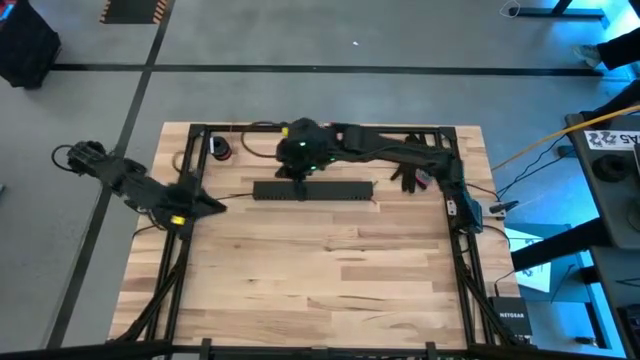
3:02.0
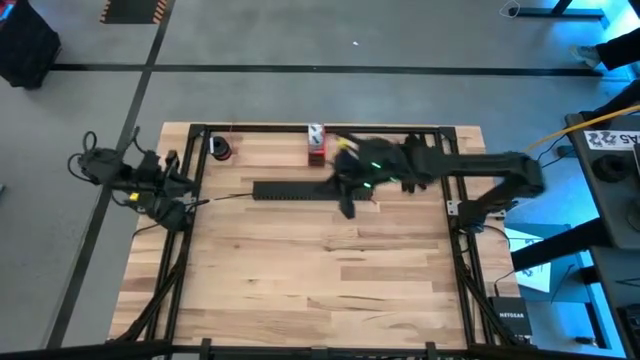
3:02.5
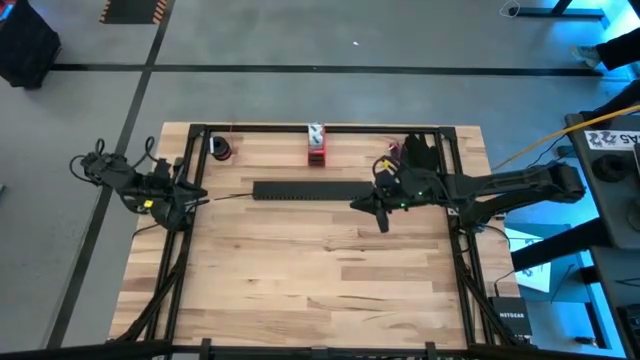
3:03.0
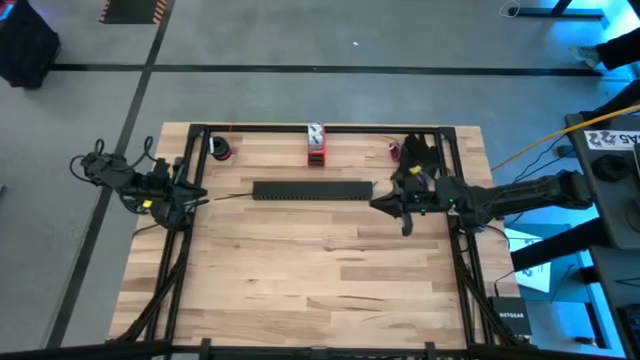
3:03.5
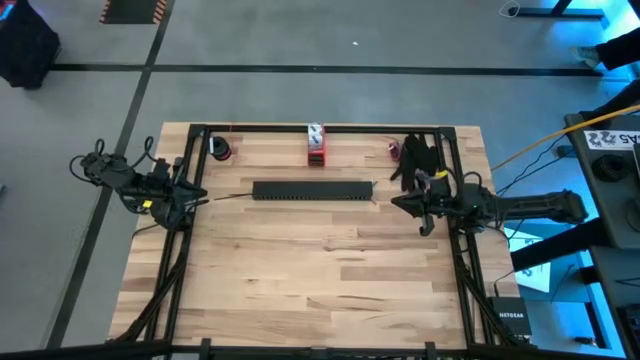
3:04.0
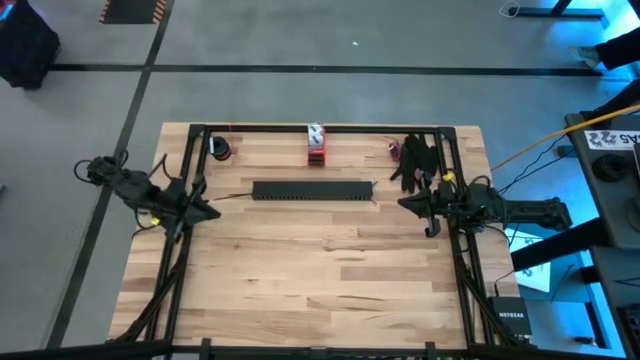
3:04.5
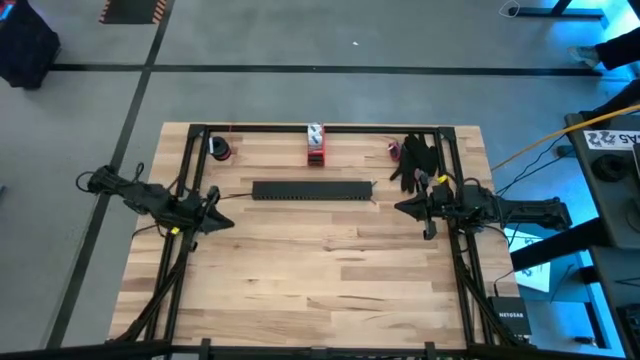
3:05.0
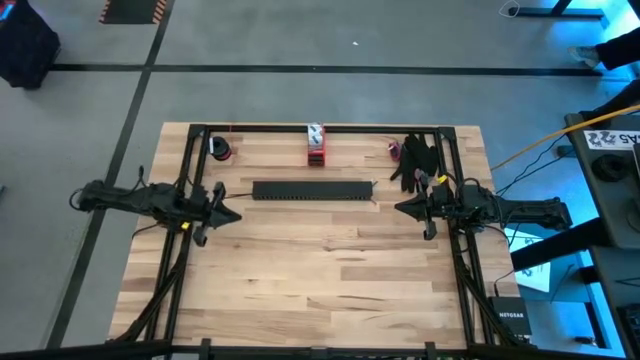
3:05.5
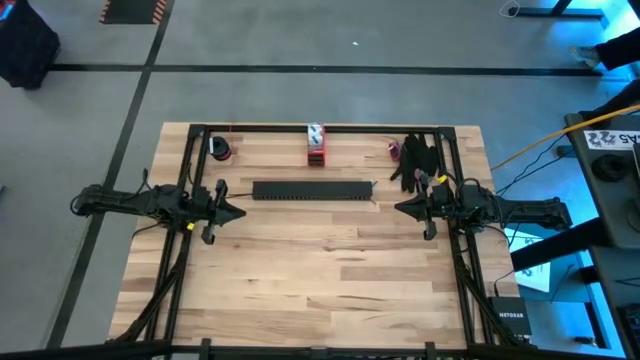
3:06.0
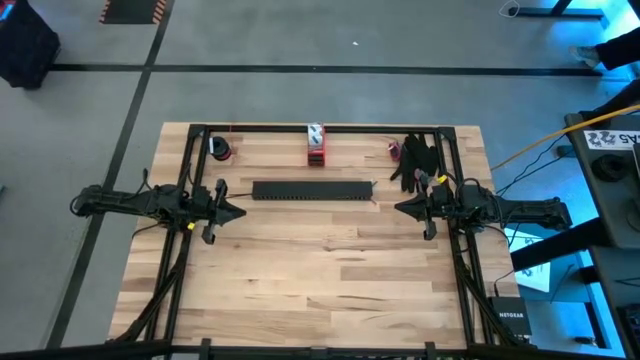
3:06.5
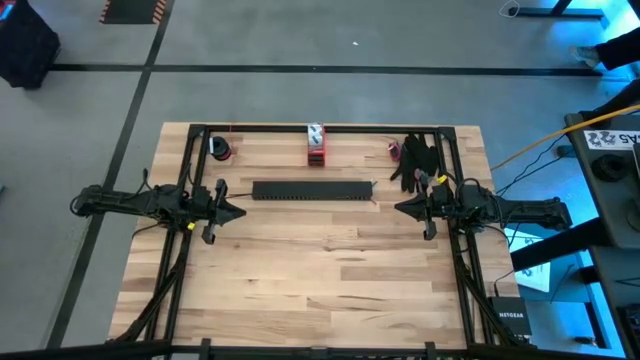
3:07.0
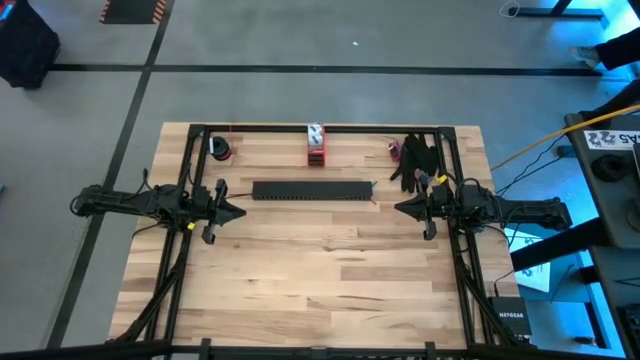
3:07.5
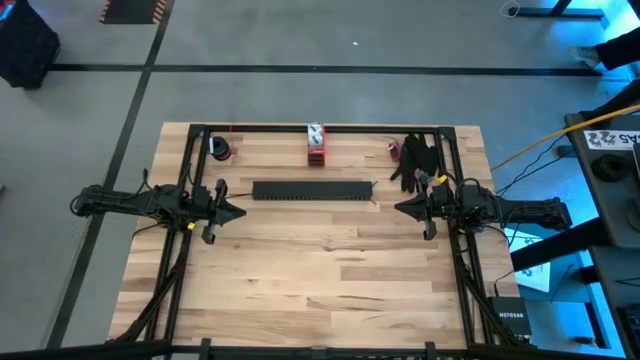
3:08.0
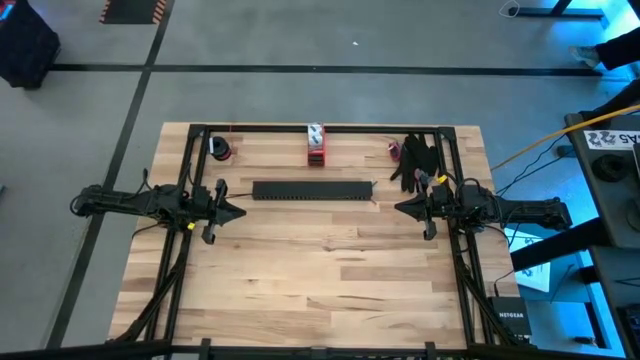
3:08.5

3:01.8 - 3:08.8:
Task: Ziptie cables
Return to Home Position

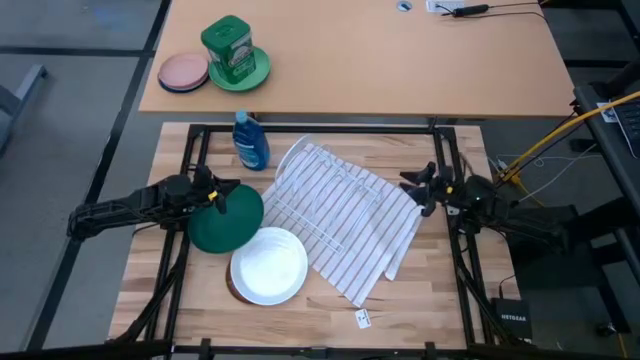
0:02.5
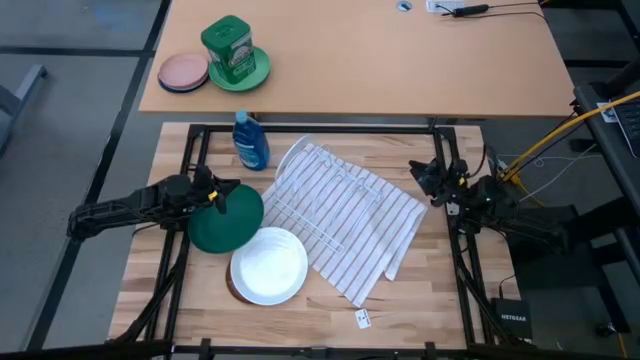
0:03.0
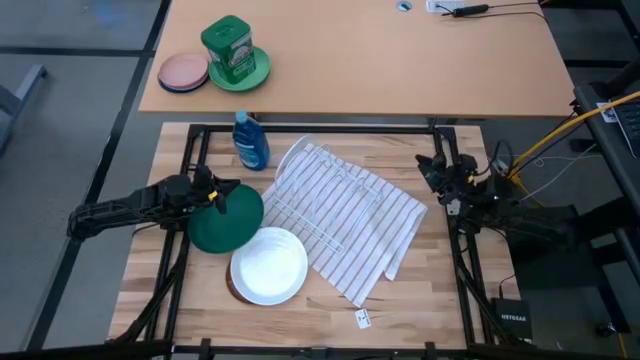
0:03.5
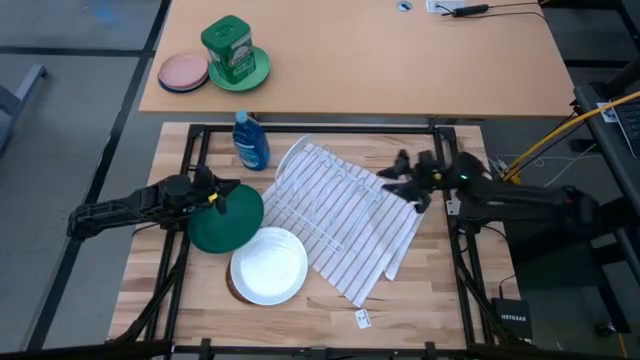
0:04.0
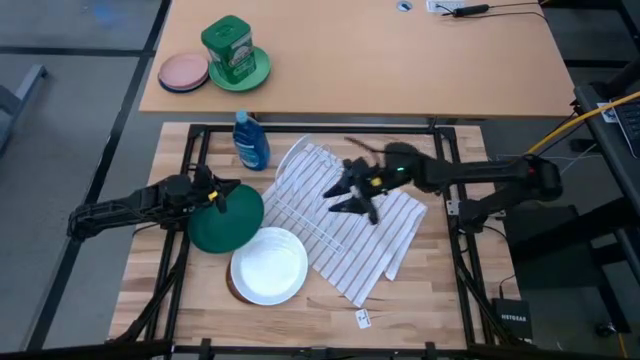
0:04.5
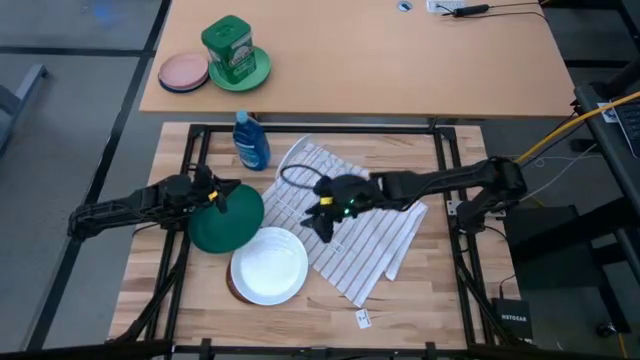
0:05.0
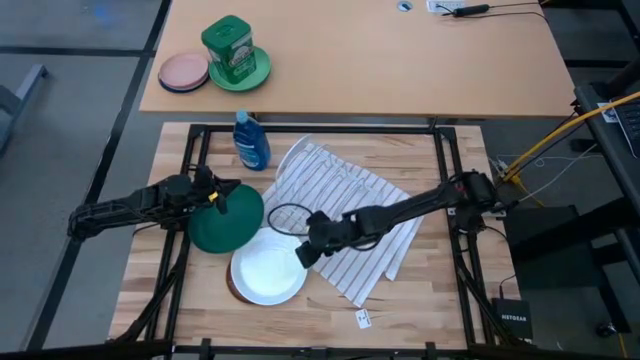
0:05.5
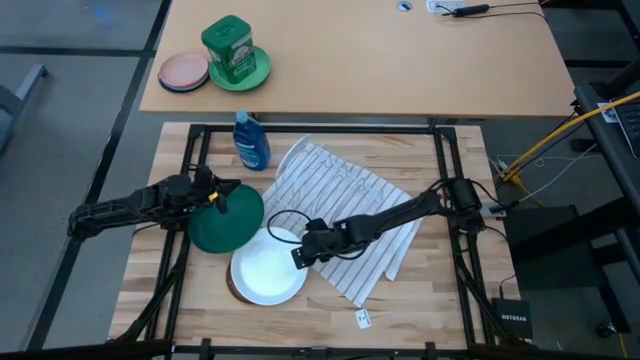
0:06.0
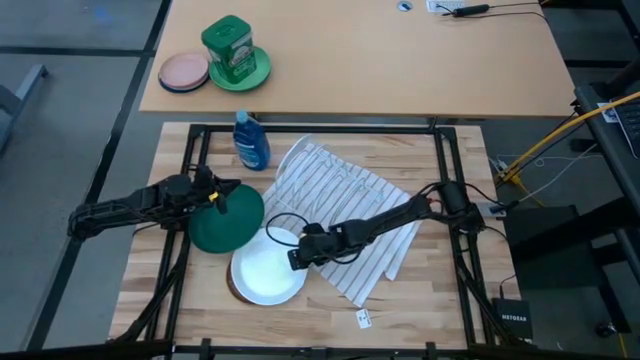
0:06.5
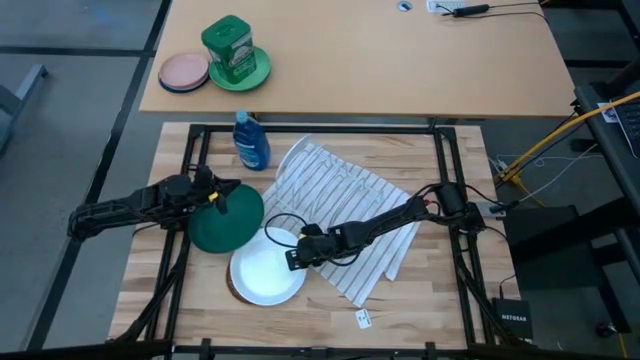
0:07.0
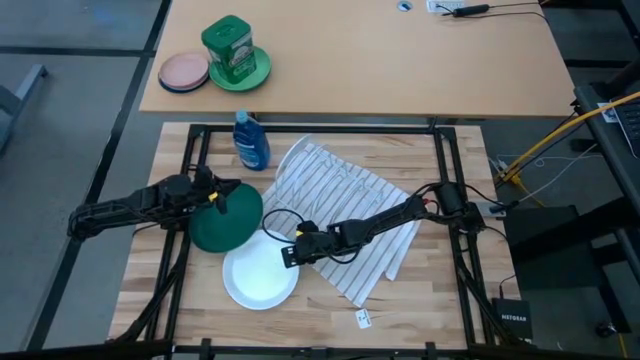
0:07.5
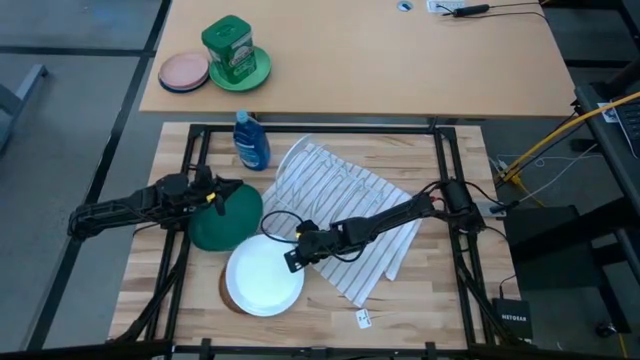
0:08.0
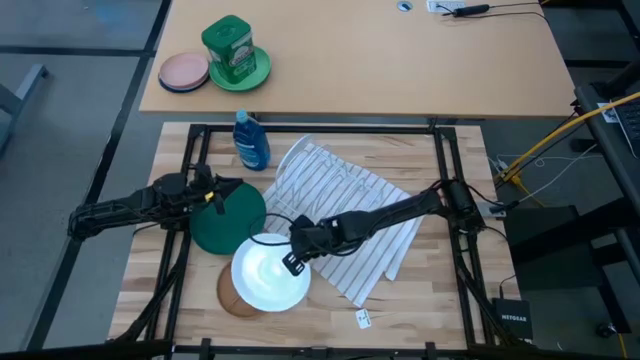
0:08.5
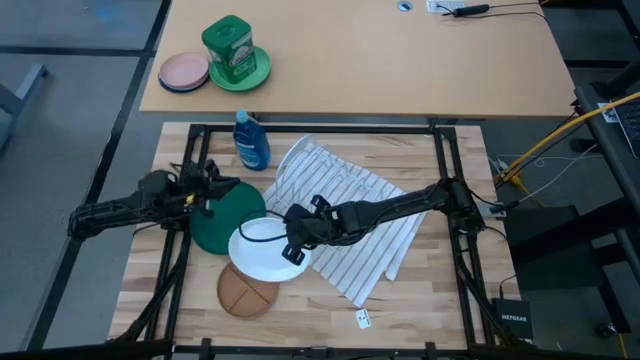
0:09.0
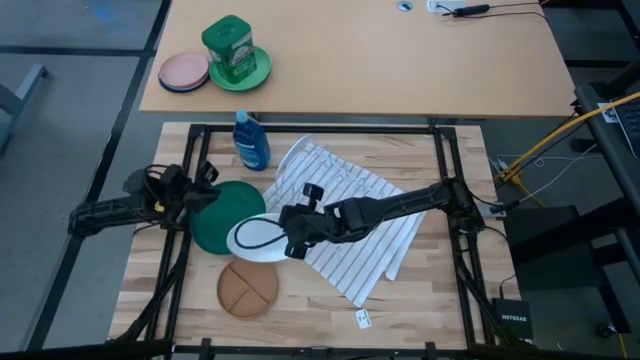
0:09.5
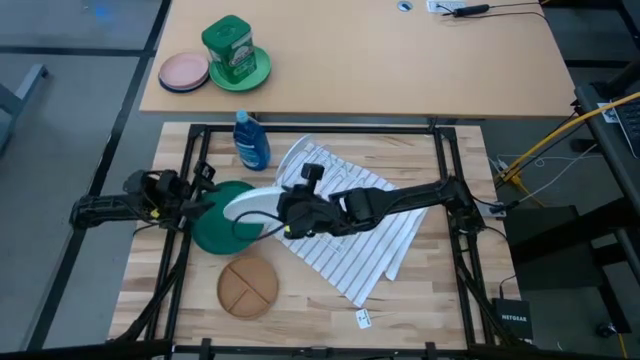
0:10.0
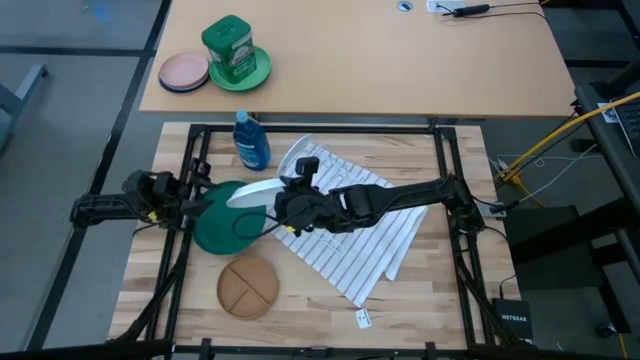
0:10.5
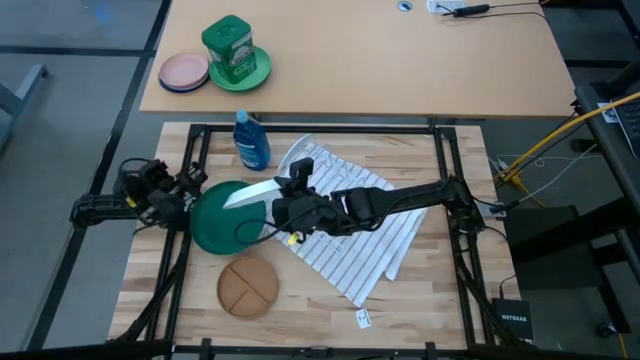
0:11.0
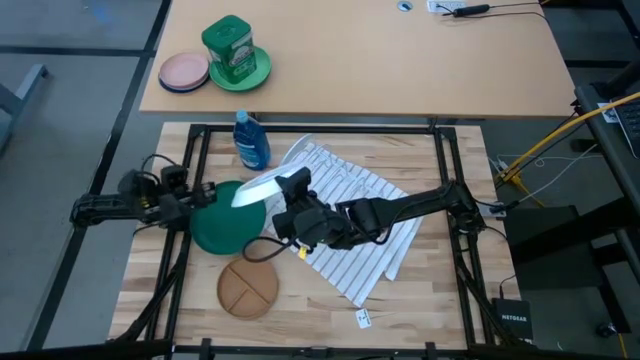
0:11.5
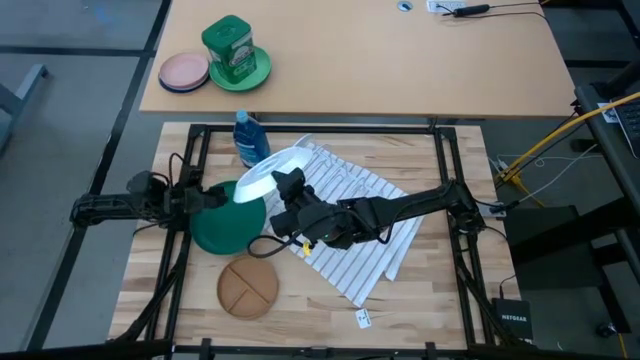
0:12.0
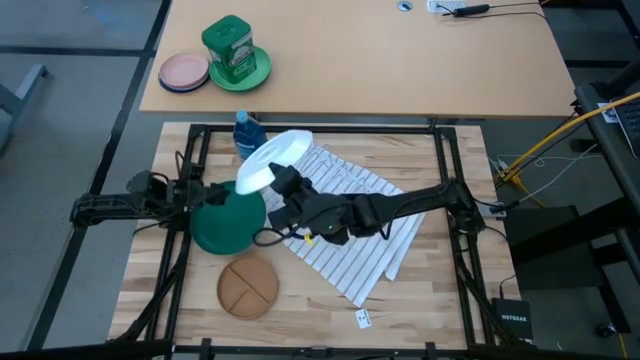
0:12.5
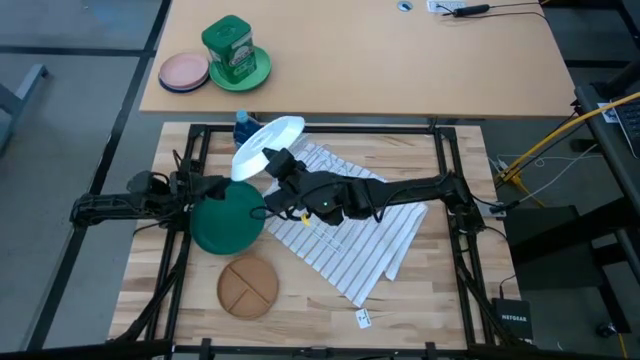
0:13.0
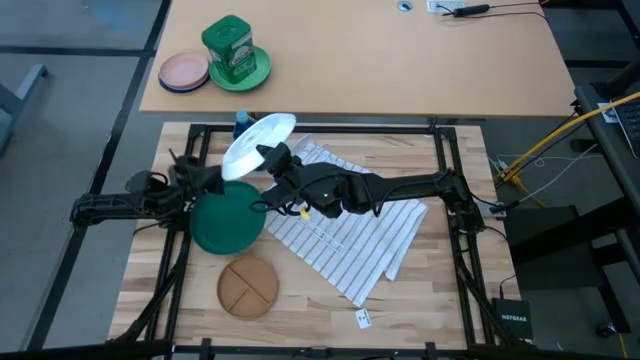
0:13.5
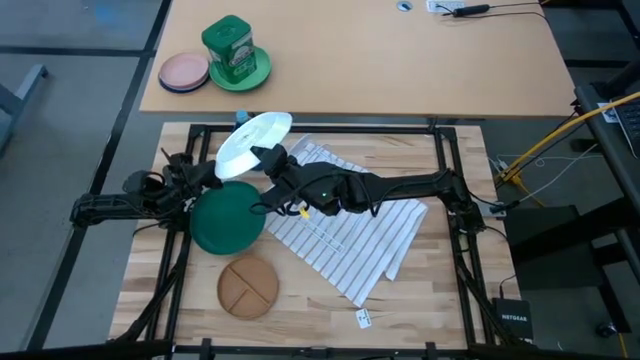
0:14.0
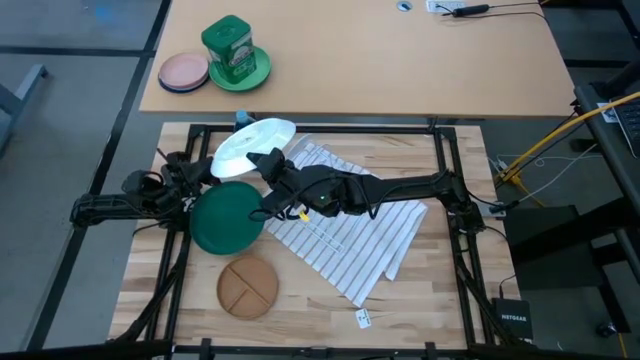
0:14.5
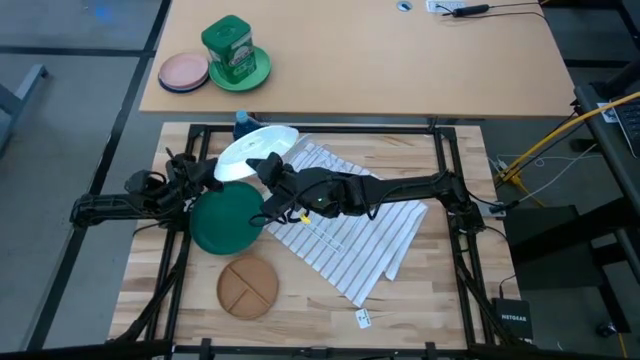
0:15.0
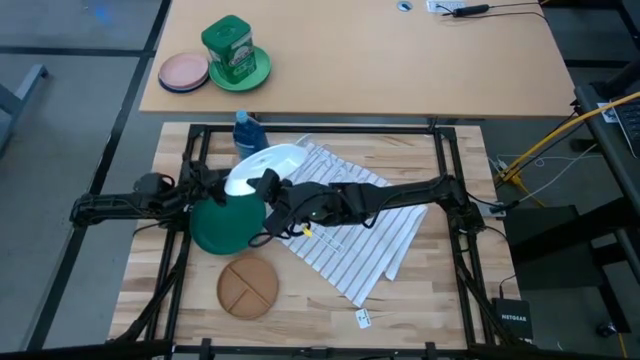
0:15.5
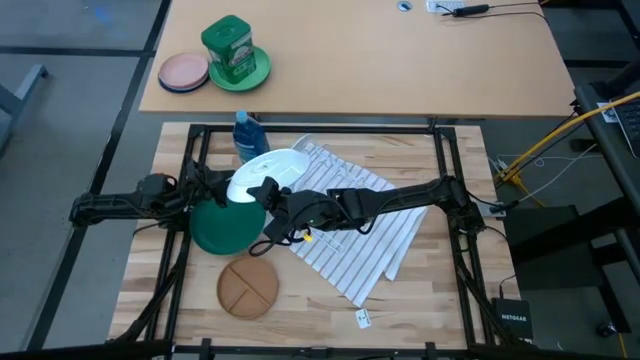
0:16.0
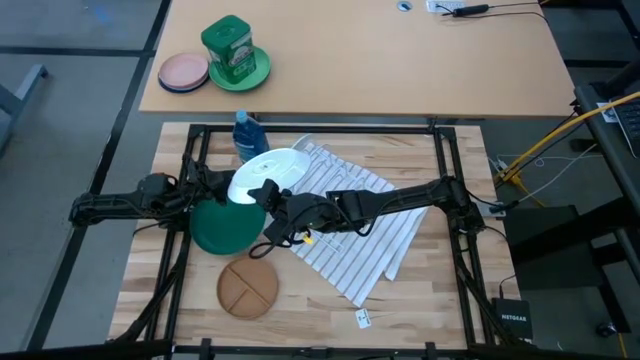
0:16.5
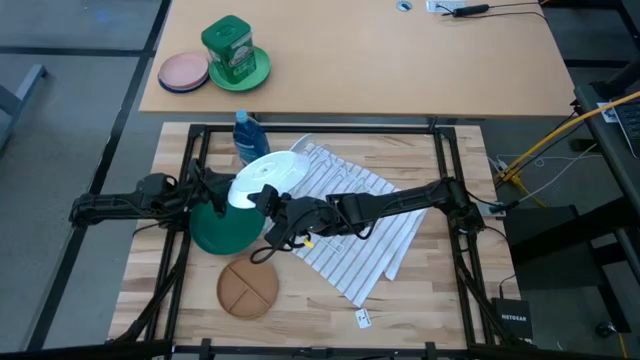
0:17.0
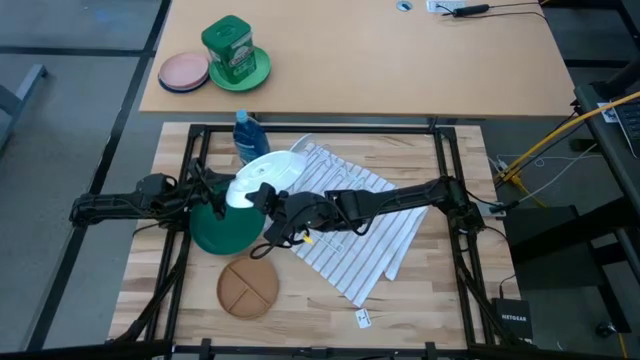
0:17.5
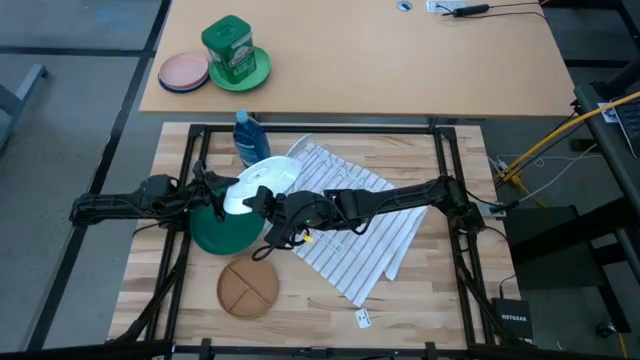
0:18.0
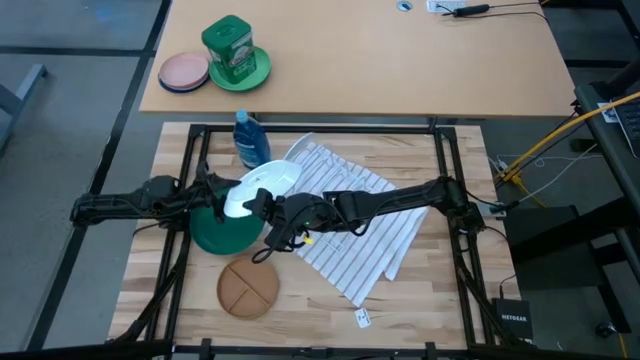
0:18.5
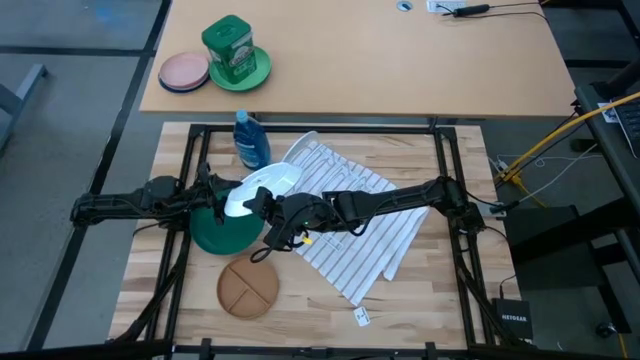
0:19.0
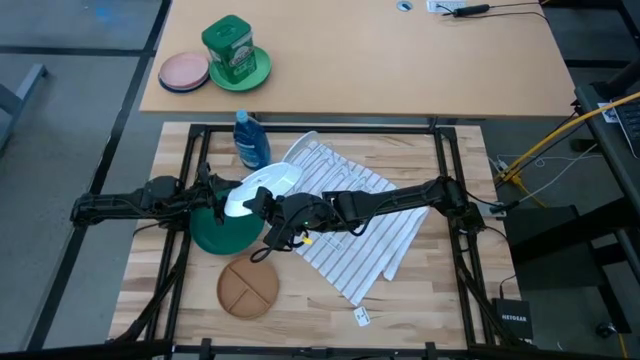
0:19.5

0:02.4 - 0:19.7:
Task: Sort dishes
Put the white plate into the white dish rack
